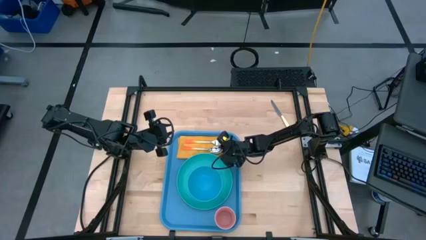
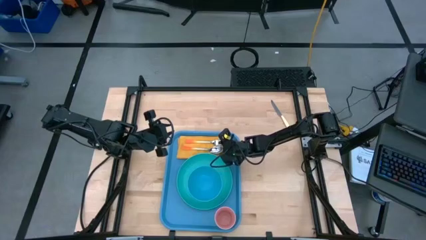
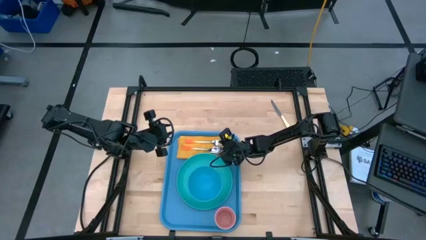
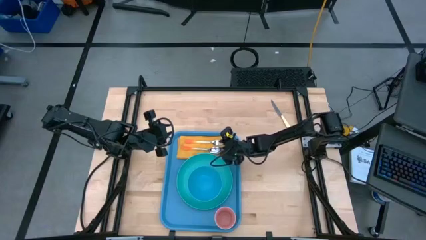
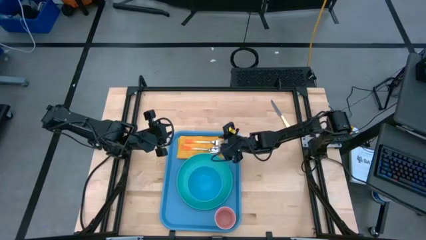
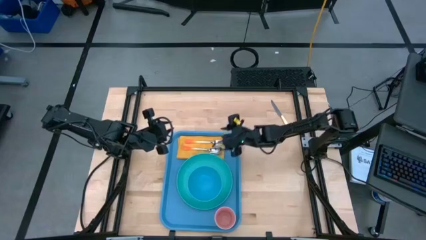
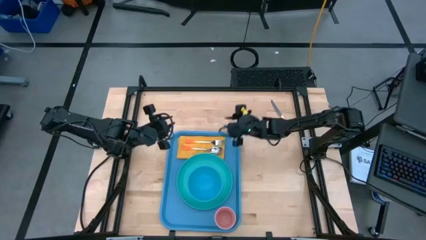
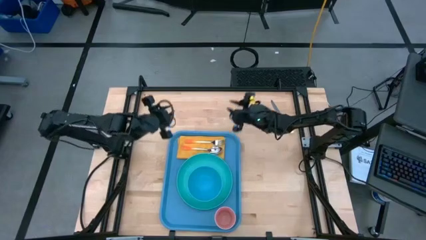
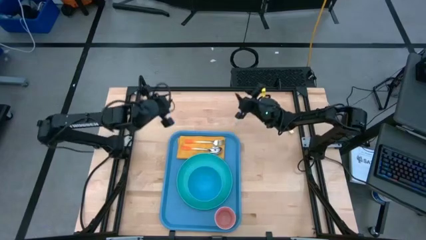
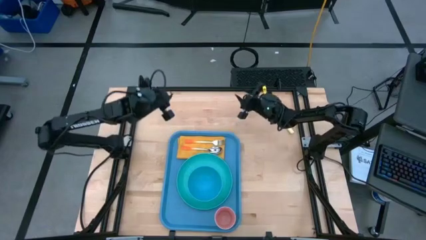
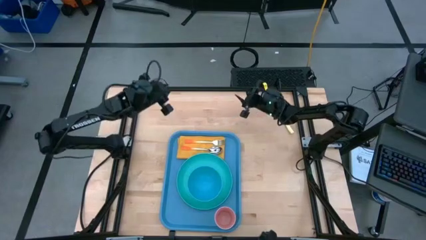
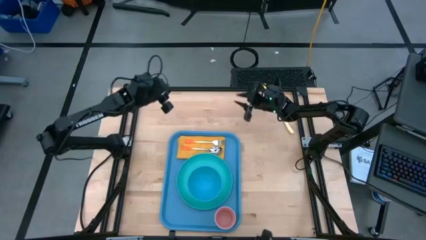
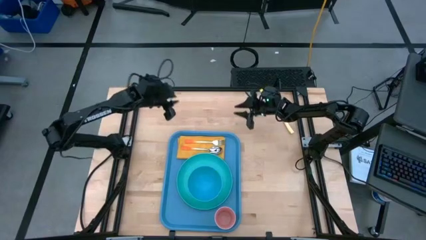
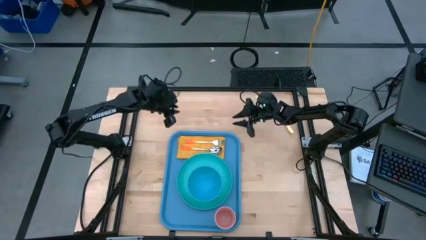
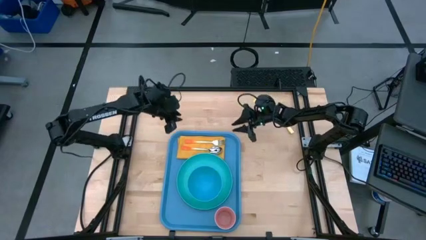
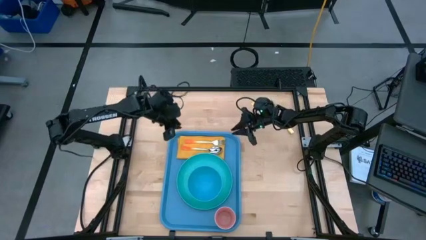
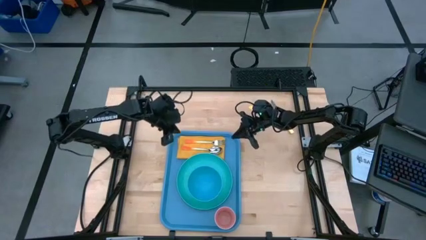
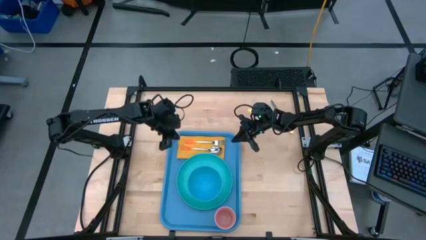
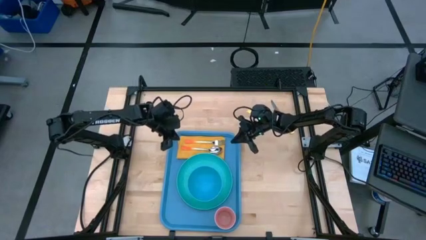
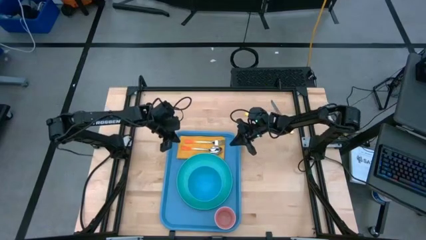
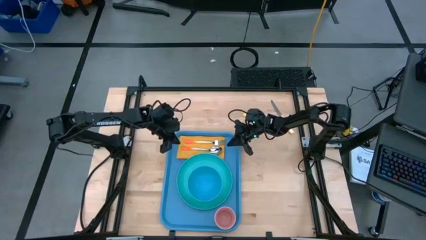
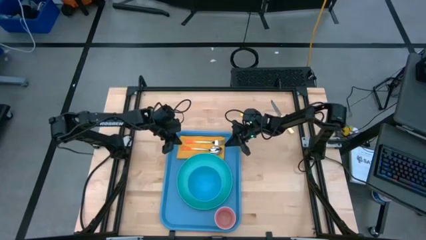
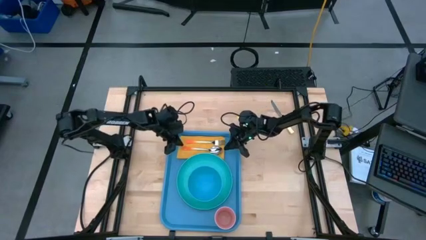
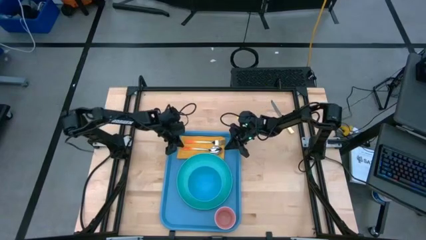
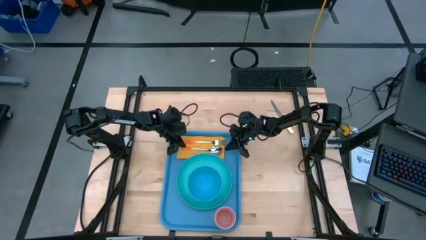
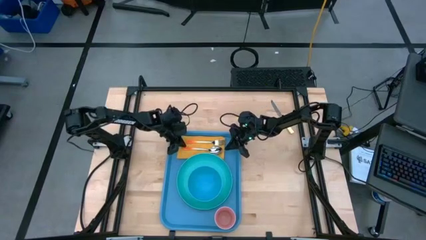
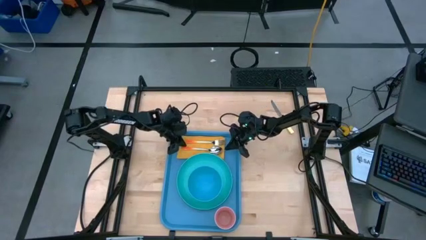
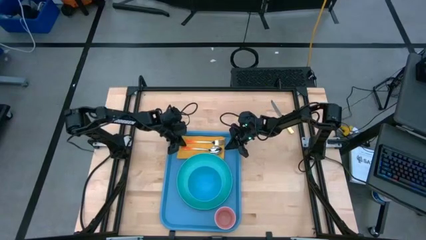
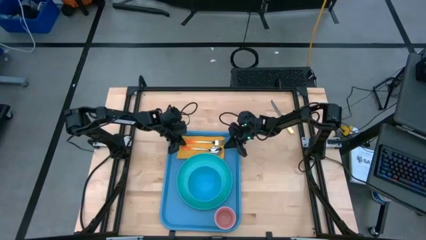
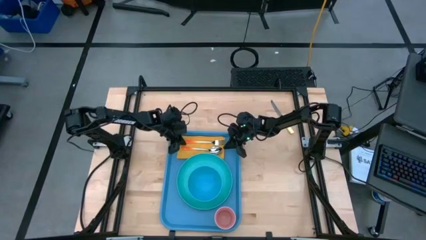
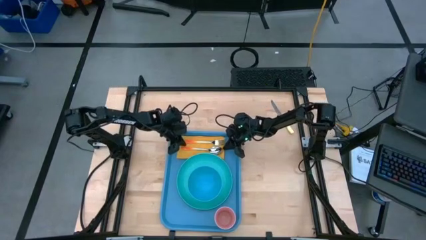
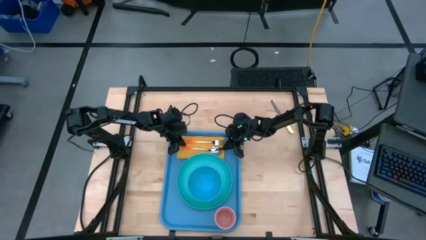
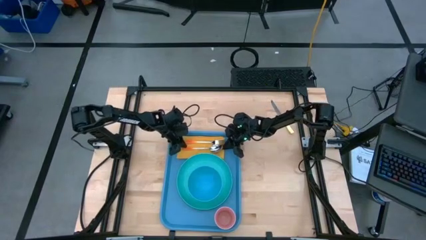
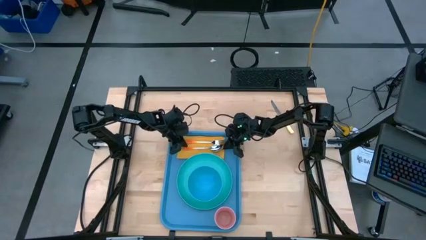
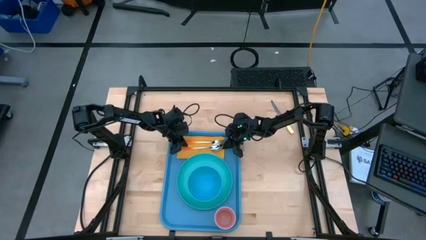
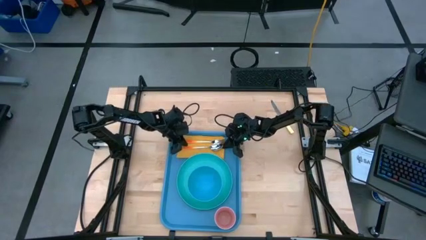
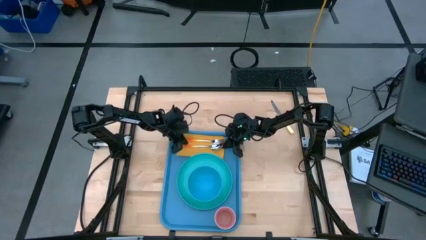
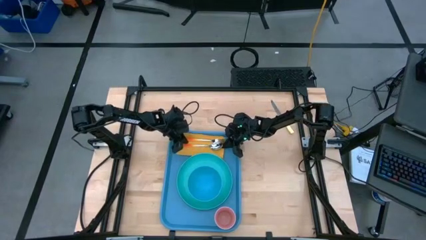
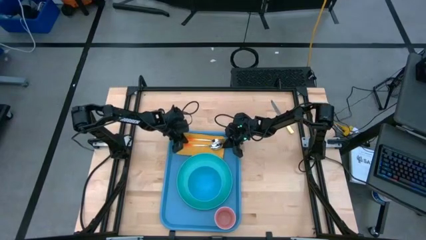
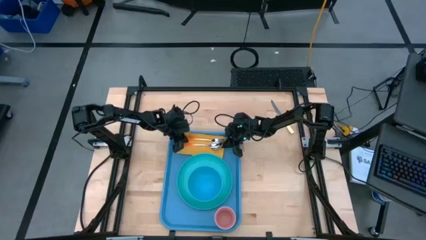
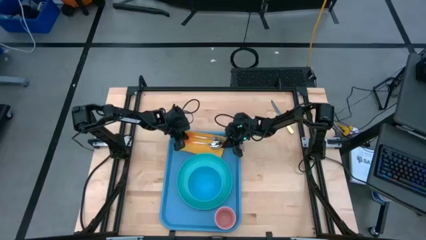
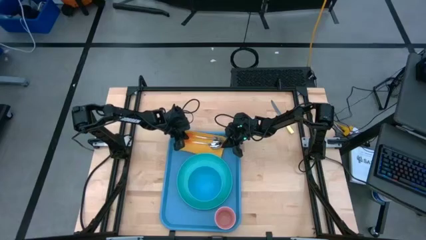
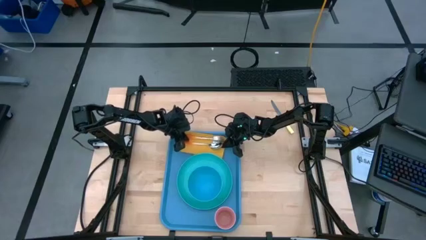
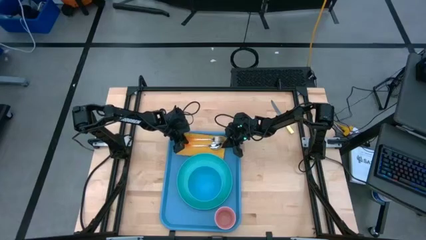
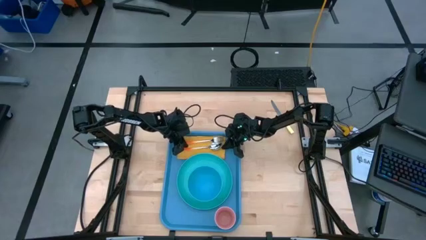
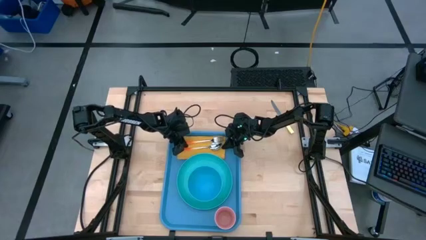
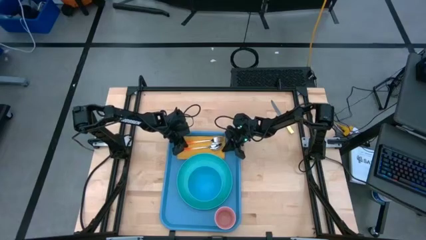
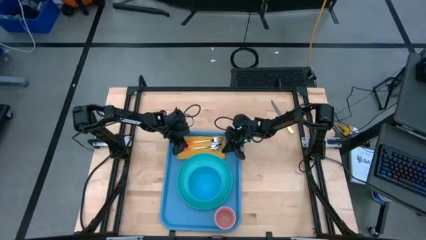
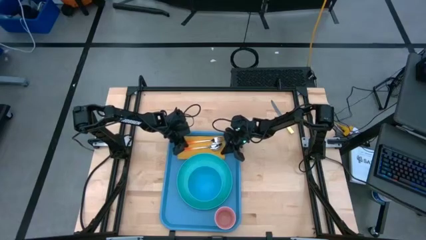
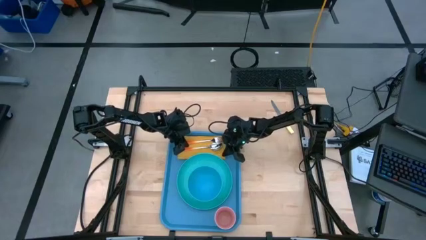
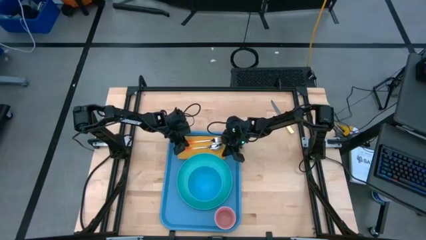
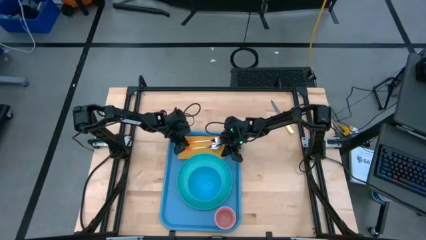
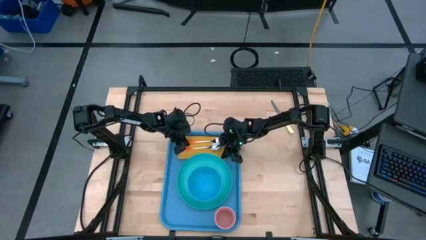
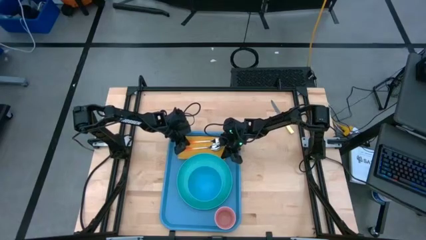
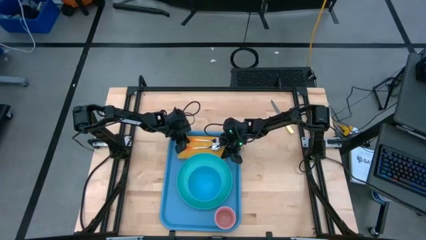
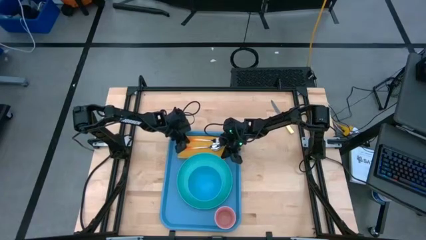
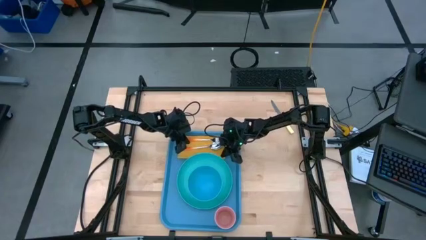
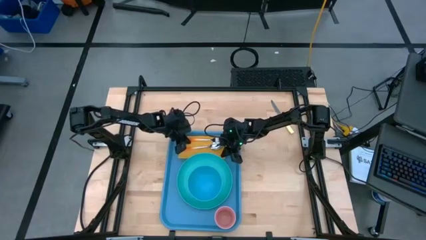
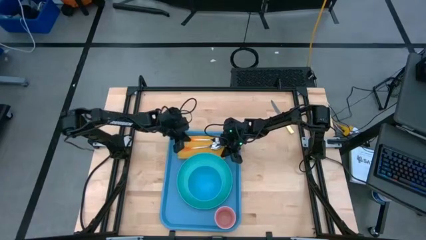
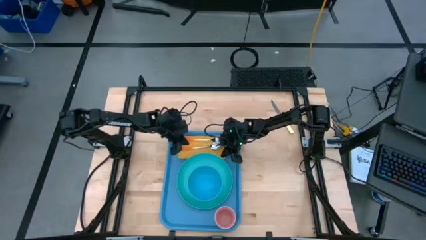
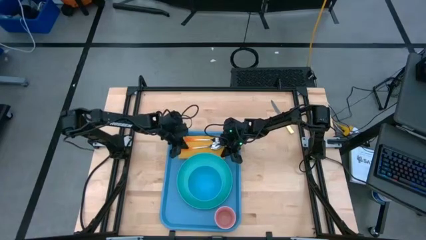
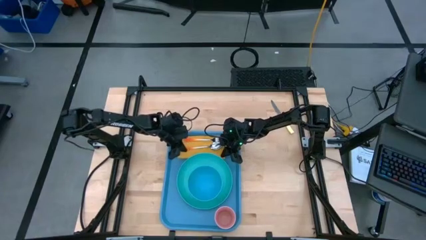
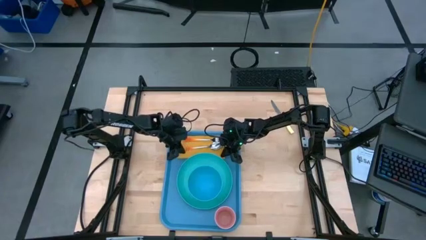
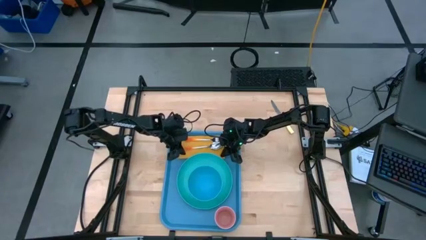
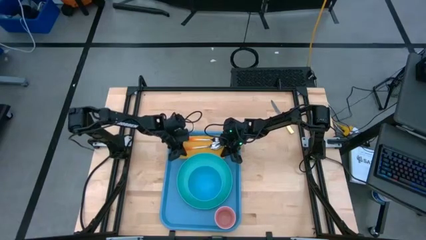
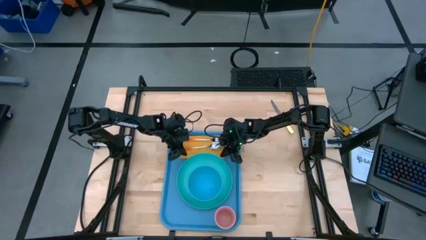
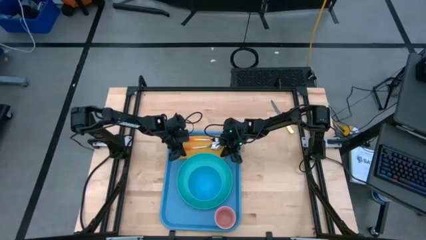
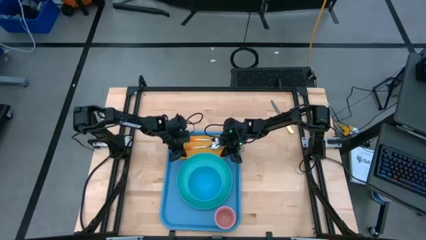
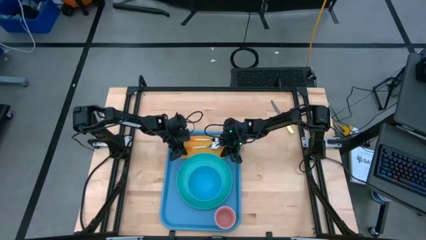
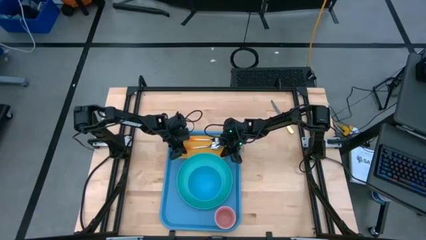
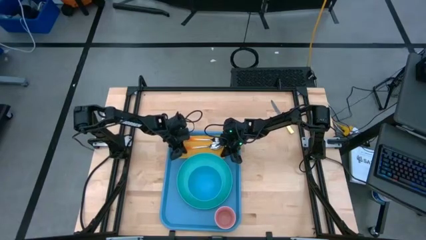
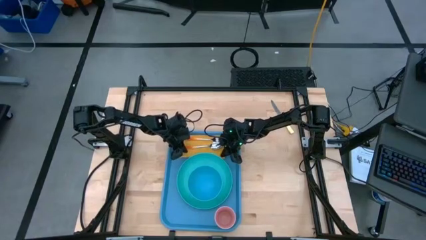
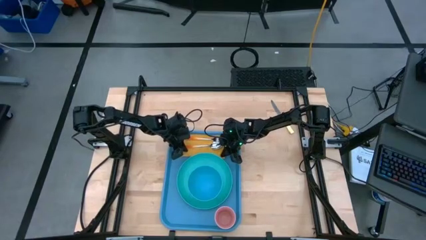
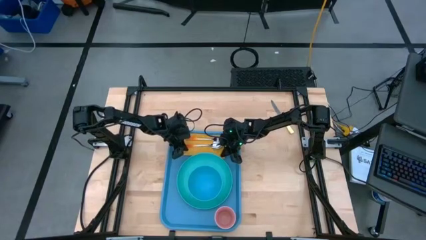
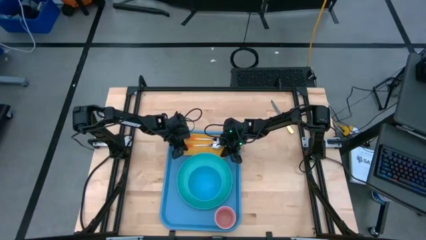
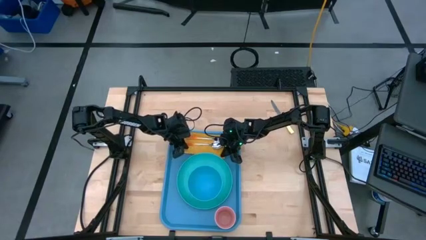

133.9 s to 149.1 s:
Task: Set up tray
Adjust the orange napkin

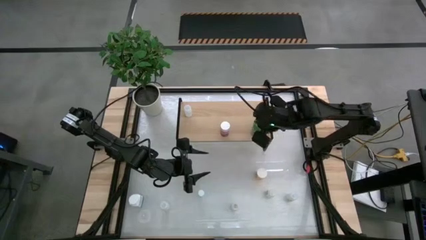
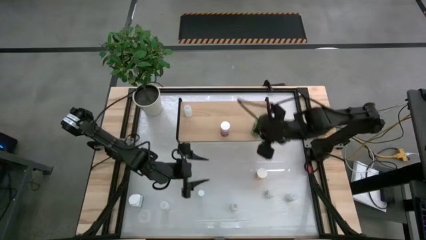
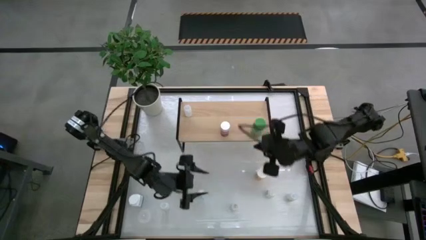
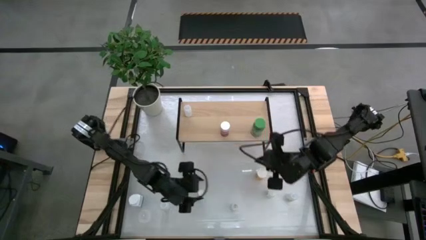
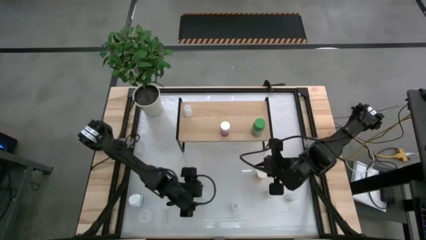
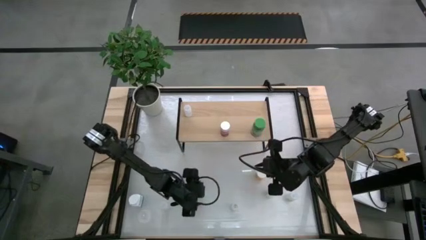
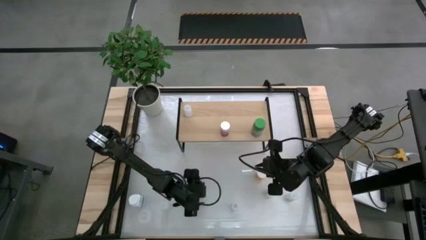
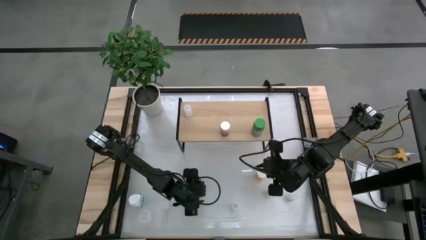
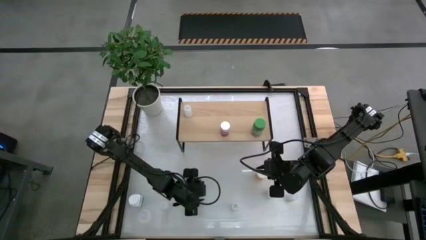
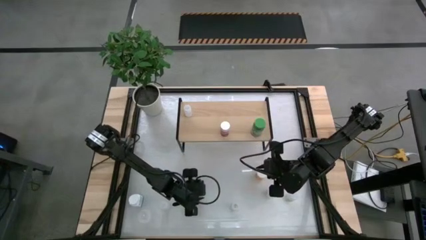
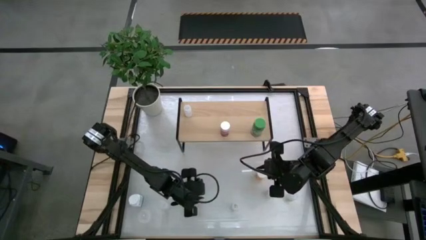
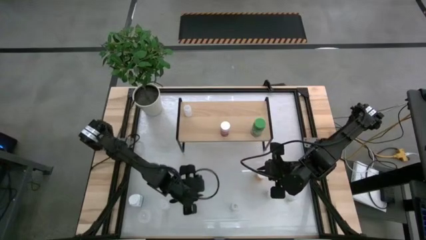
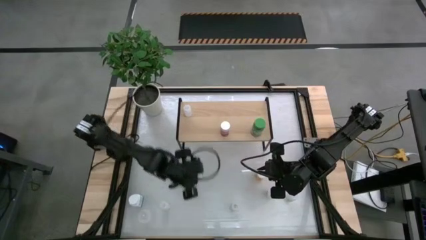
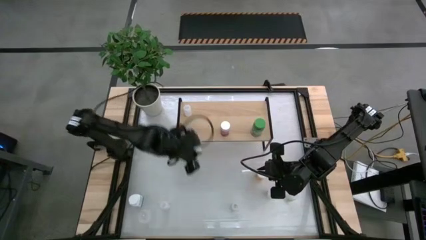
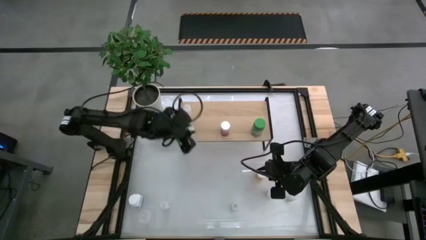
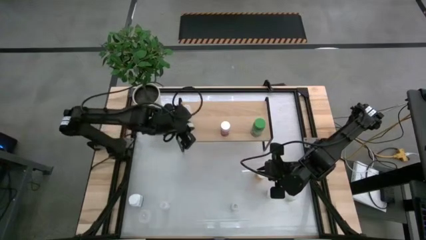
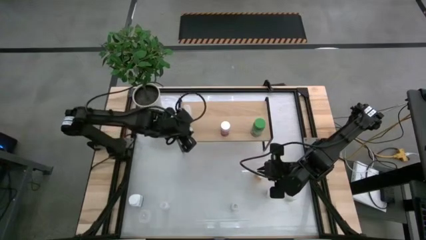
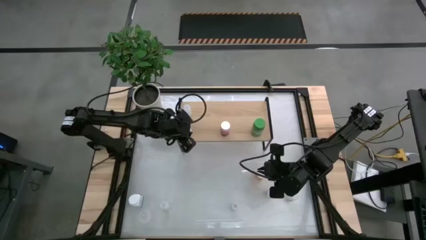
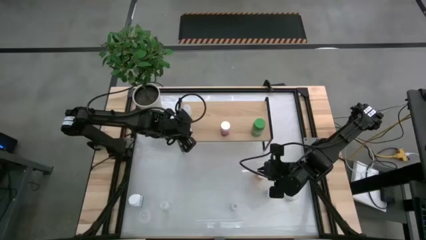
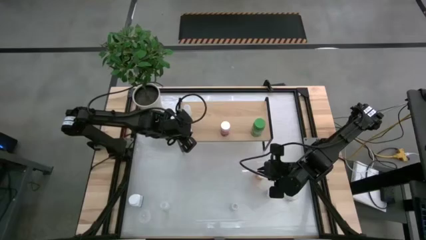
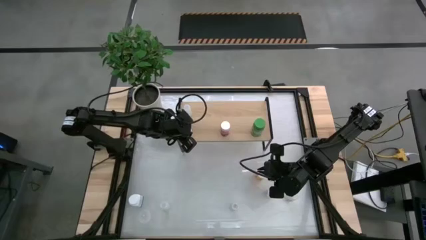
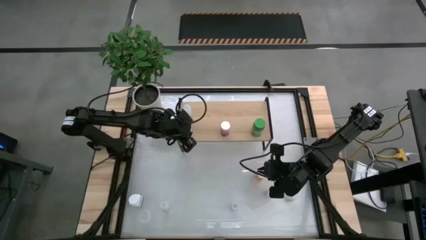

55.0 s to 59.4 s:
Task: Pick and place medicine bottles onto shelf by color
Put the blue pill bottle on the shelf
